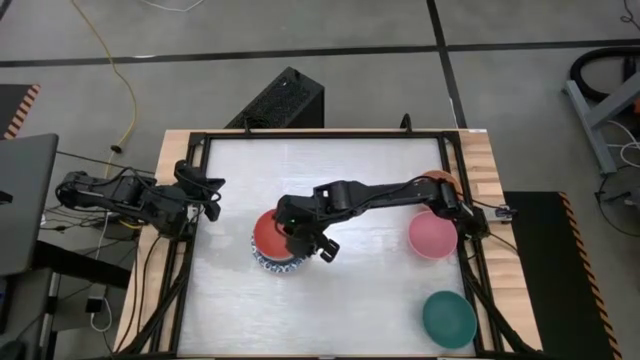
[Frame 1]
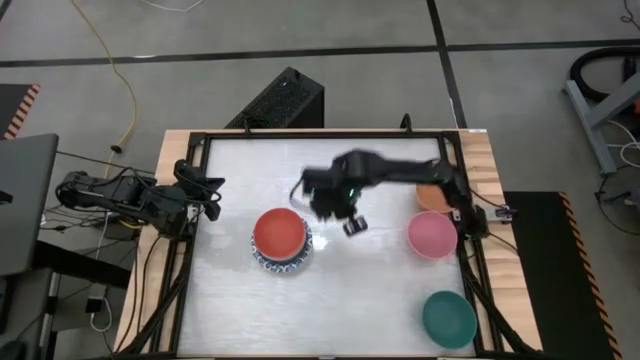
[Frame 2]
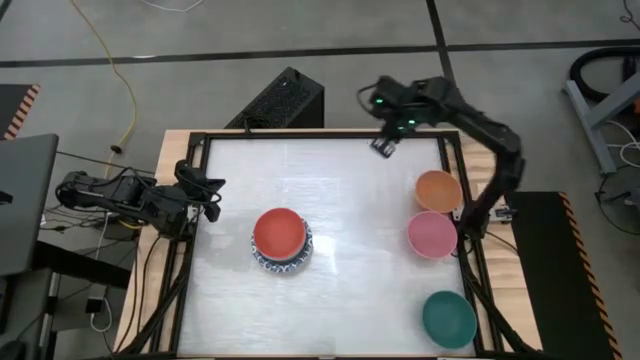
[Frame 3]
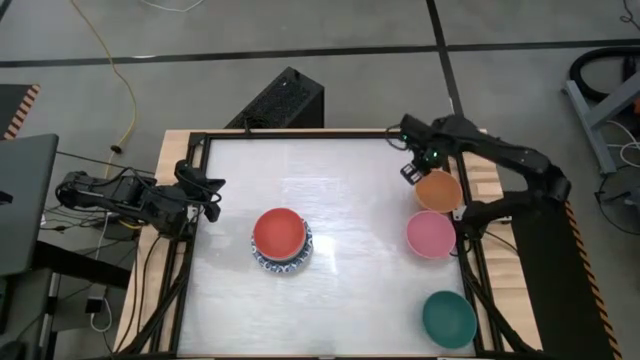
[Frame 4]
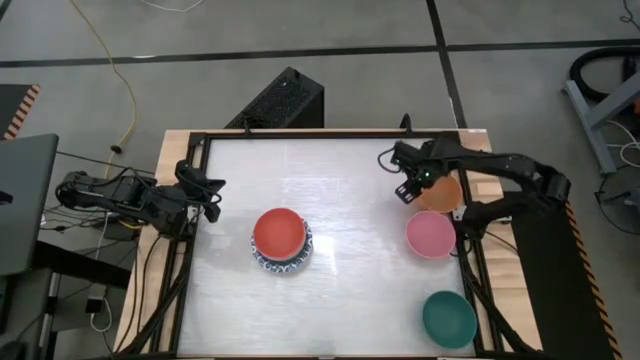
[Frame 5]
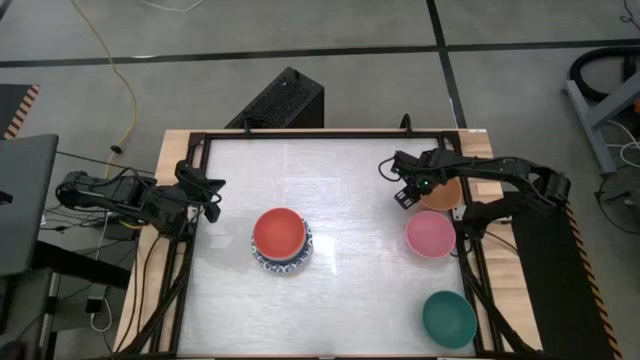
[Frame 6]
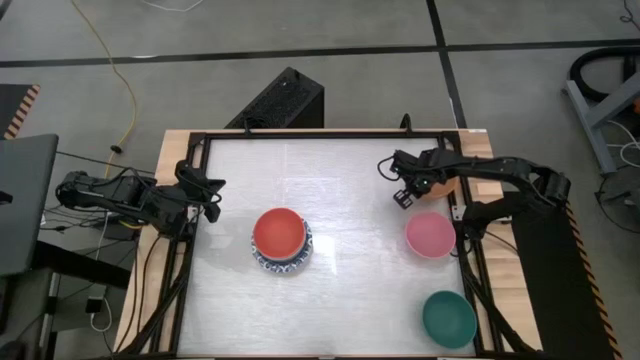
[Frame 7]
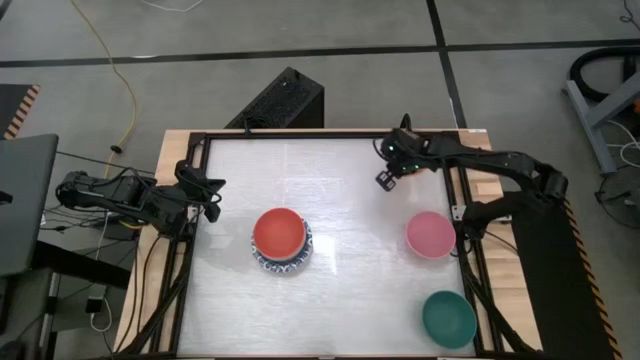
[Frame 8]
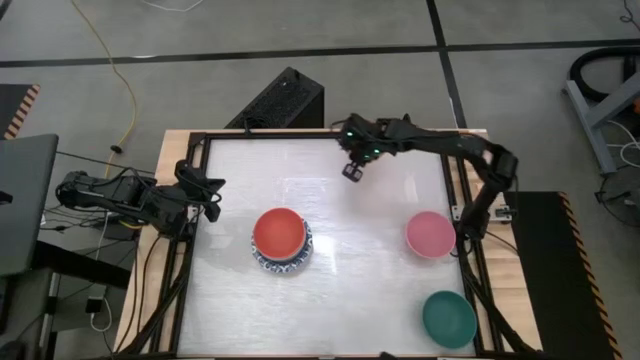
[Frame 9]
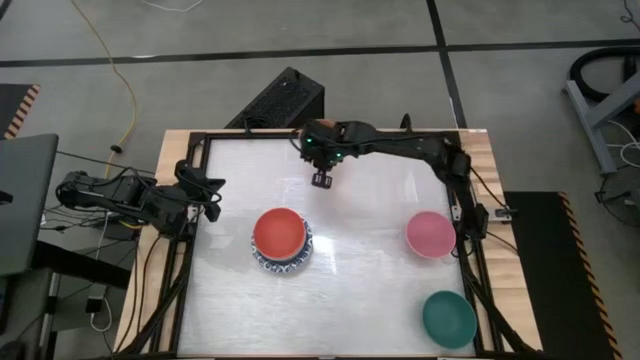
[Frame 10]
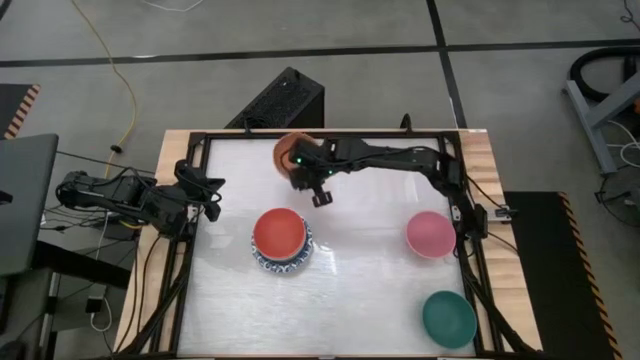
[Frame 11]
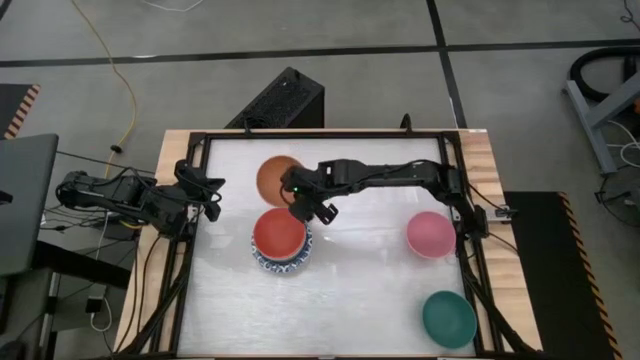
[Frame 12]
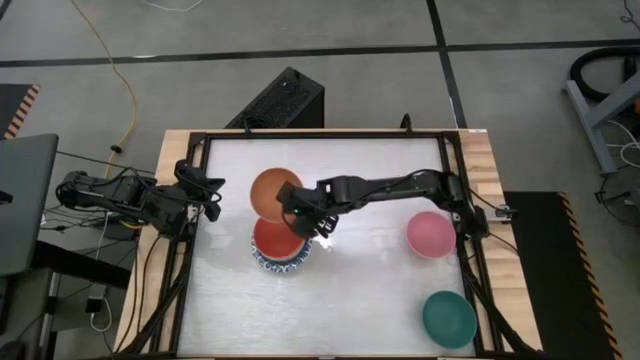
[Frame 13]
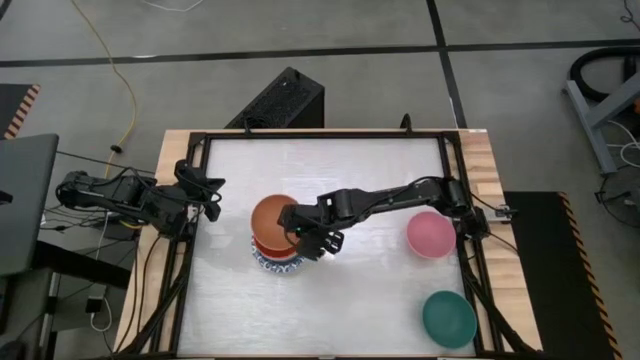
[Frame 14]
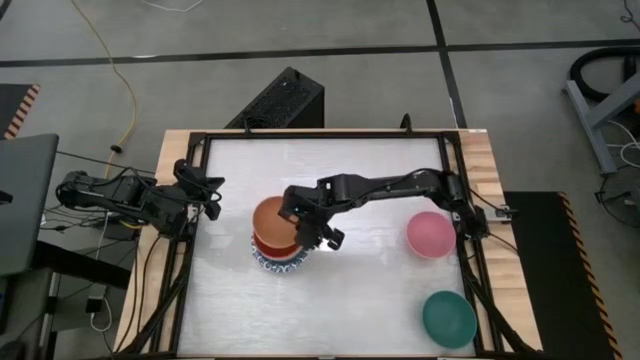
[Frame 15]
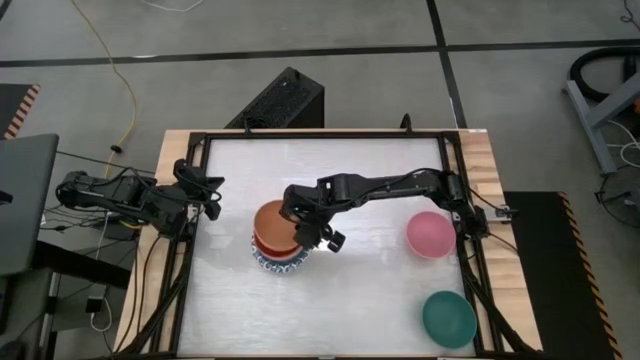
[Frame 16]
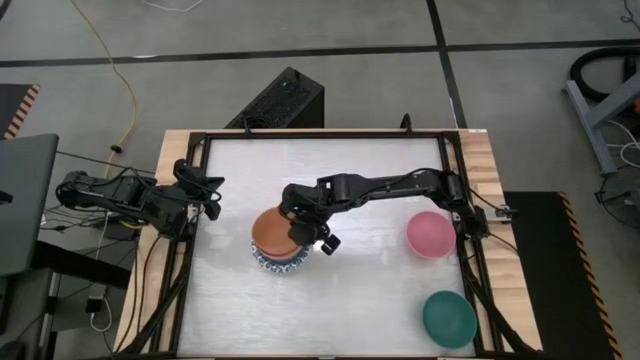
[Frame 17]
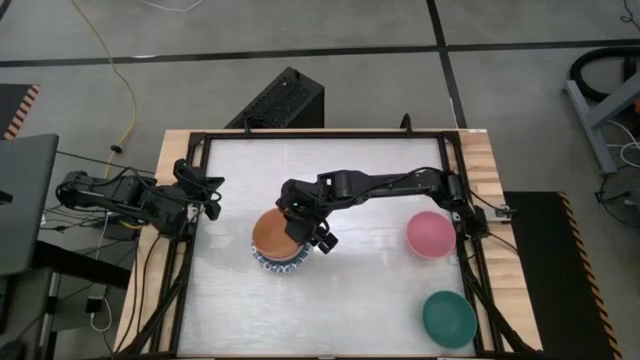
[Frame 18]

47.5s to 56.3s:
Stack the orange bowl on top of the red bowl

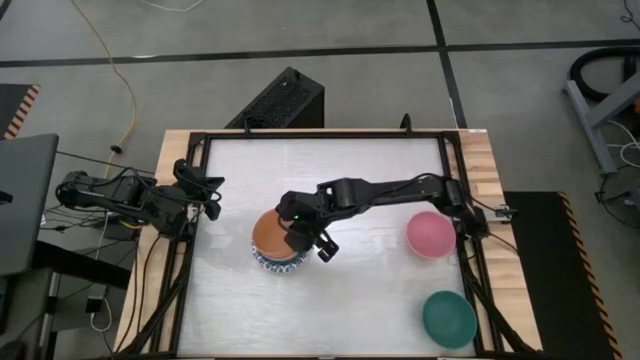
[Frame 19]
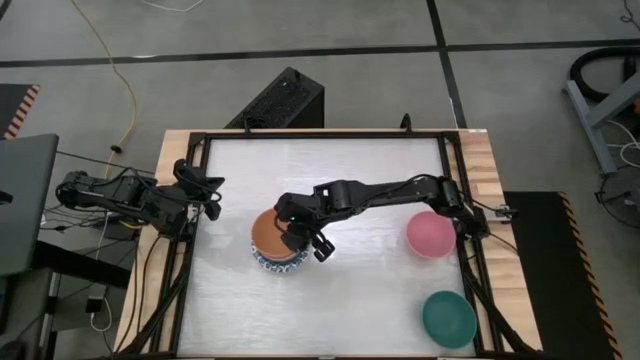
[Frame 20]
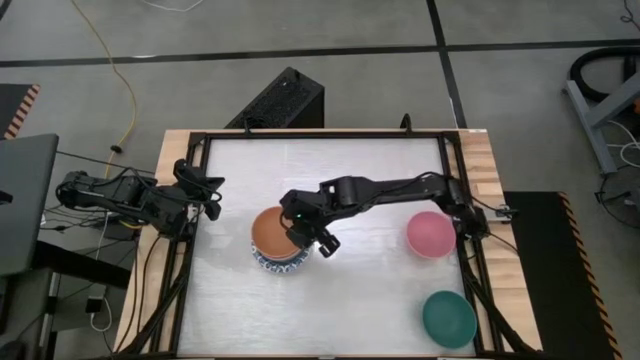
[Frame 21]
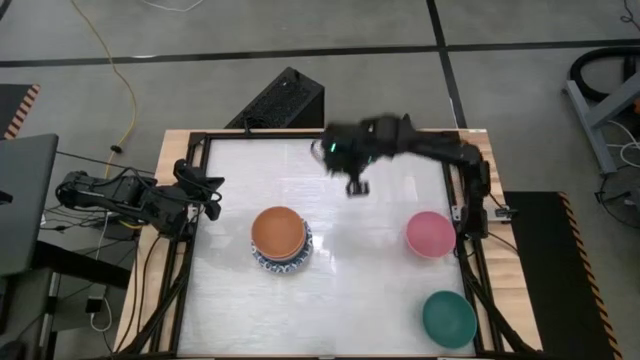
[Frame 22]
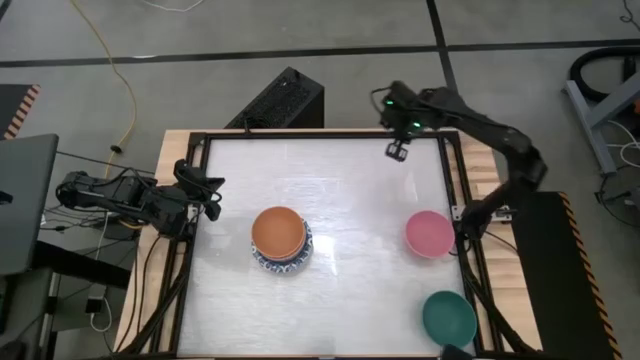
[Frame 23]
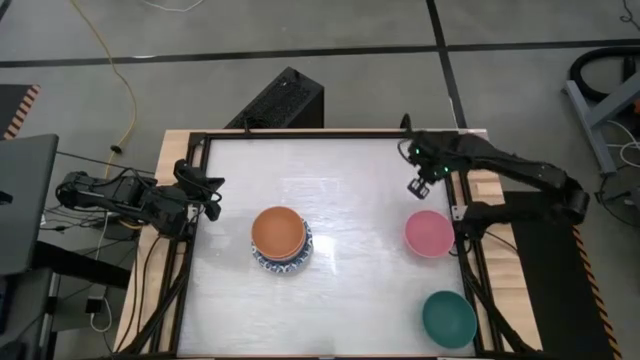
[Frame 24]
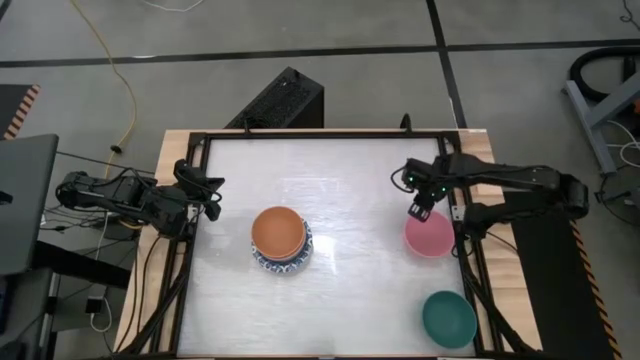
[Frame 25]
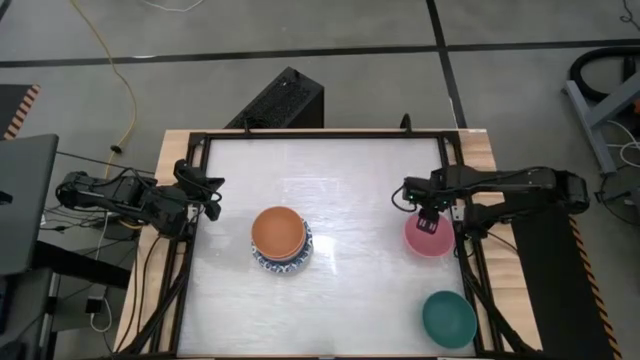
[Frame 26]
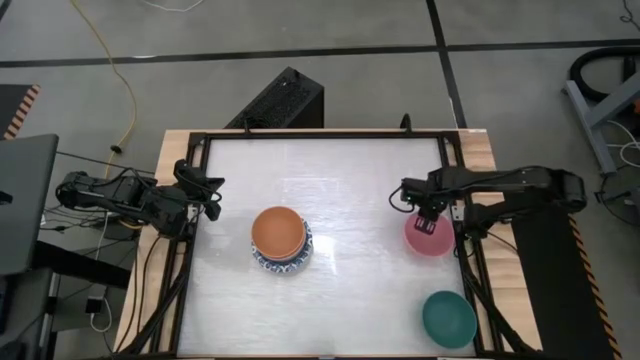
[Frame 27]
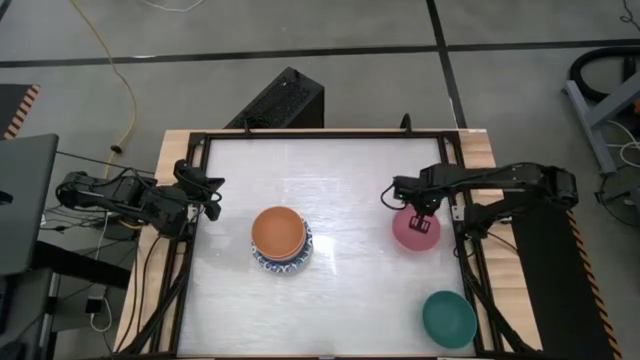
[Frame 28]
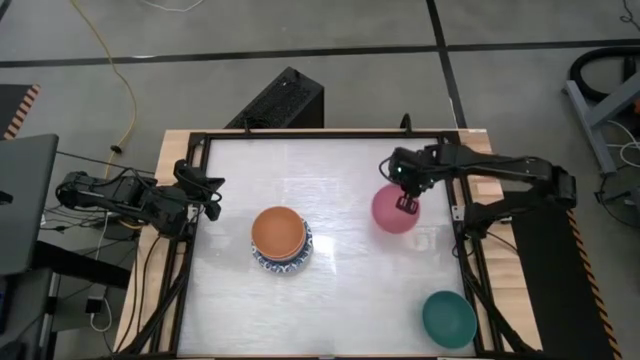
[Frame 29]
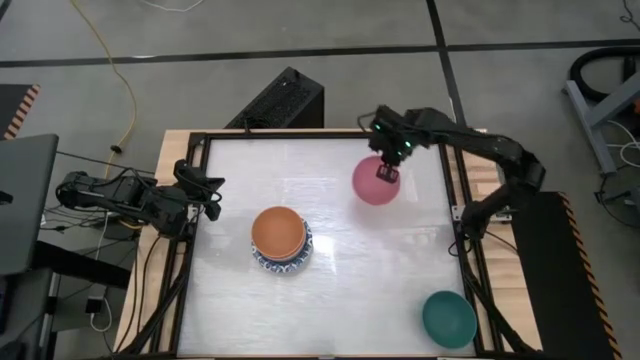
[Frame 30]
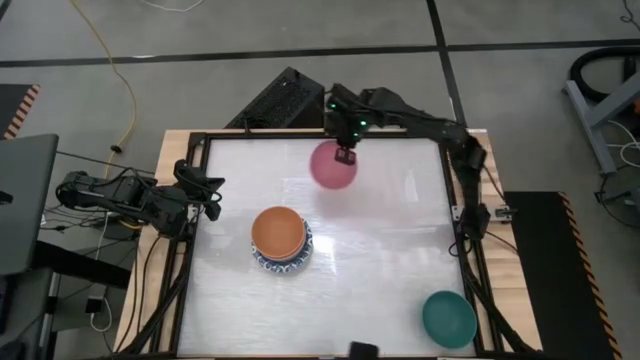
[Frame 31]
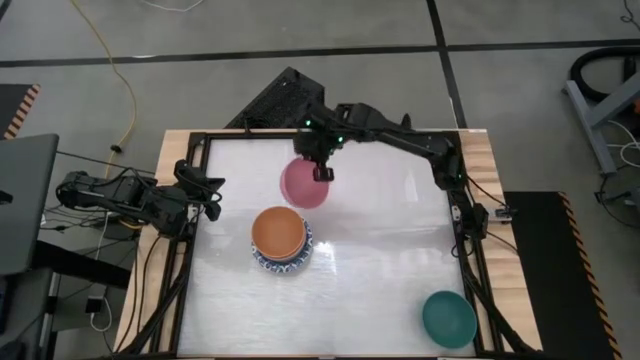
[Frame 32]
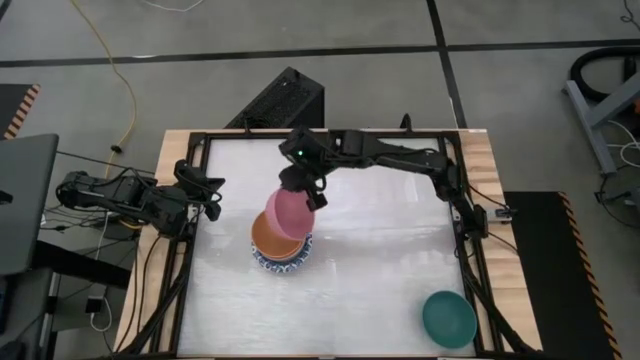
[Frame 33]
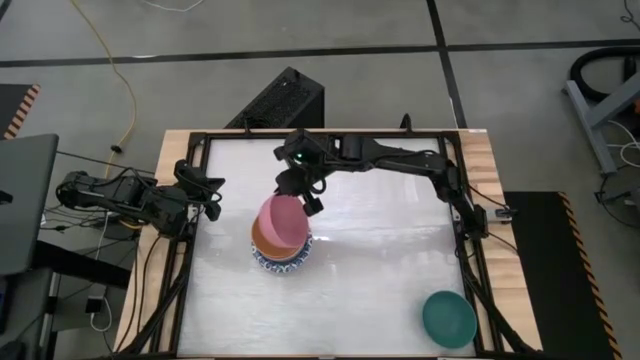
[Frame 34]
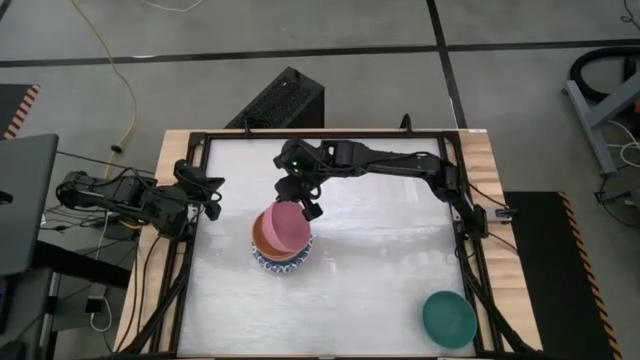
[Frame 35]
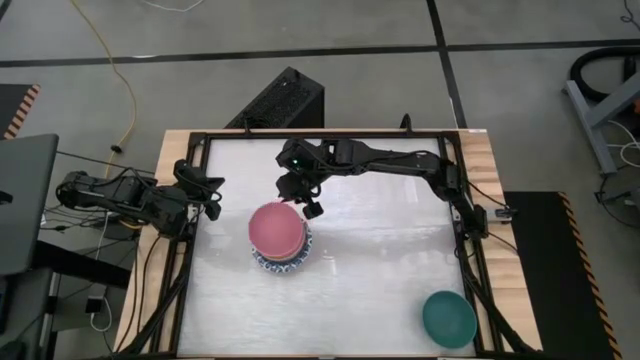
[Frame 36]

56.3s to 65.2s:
Stack the pink bowl on top of the orange bowl
